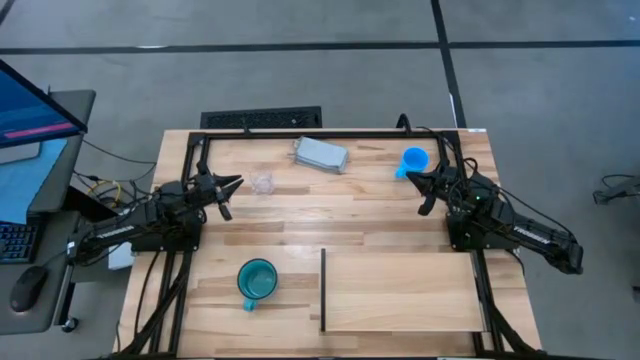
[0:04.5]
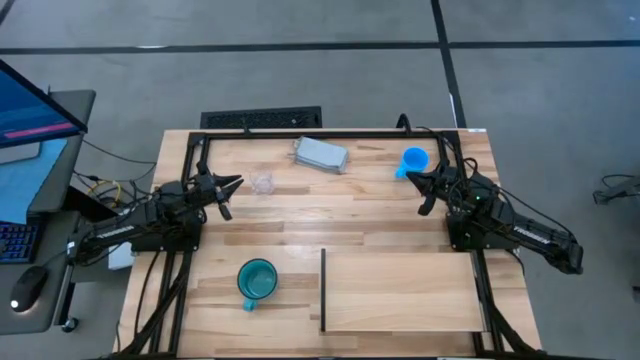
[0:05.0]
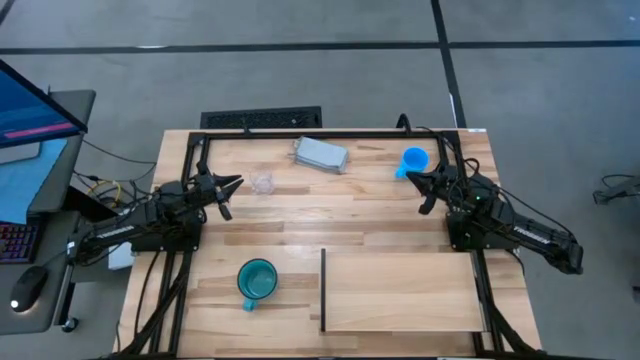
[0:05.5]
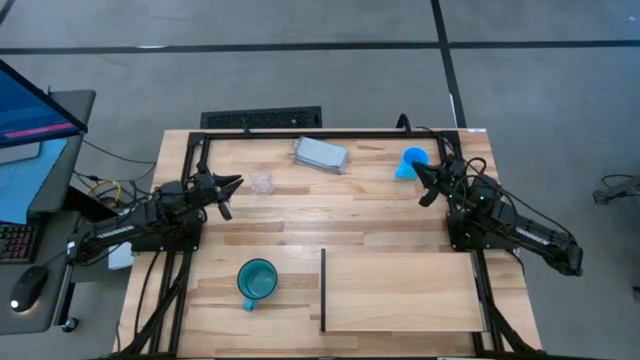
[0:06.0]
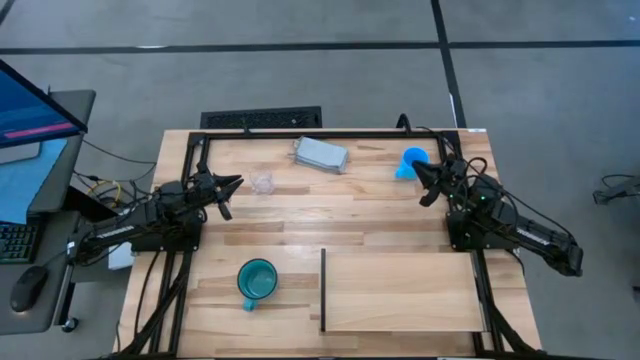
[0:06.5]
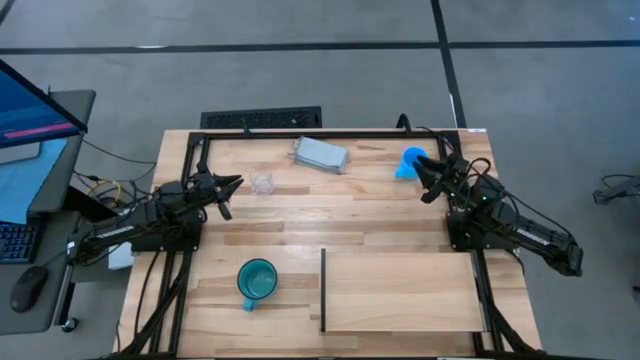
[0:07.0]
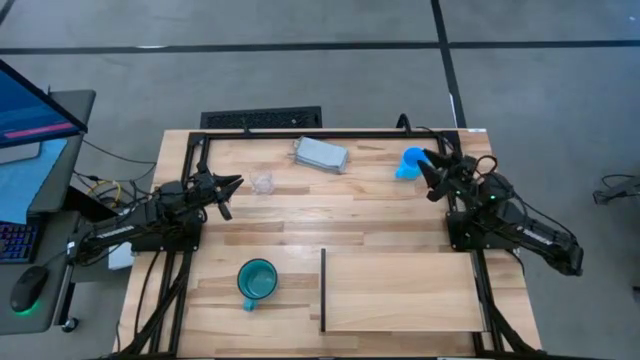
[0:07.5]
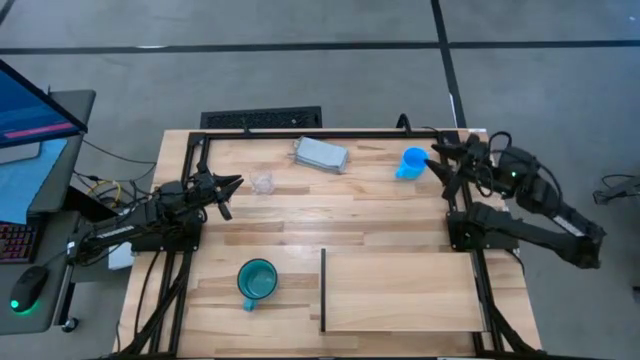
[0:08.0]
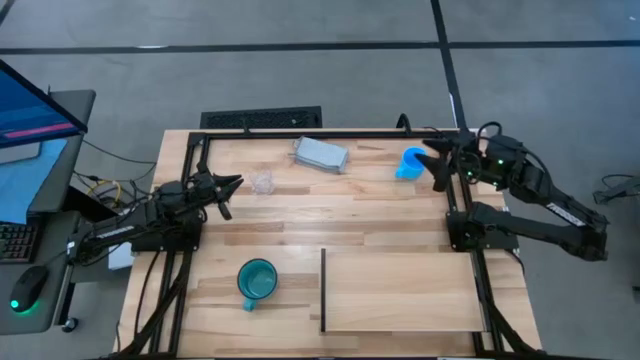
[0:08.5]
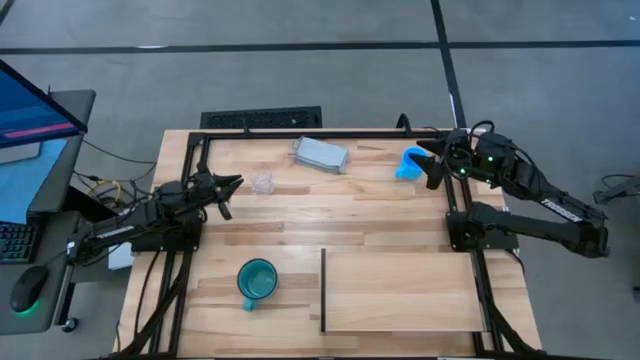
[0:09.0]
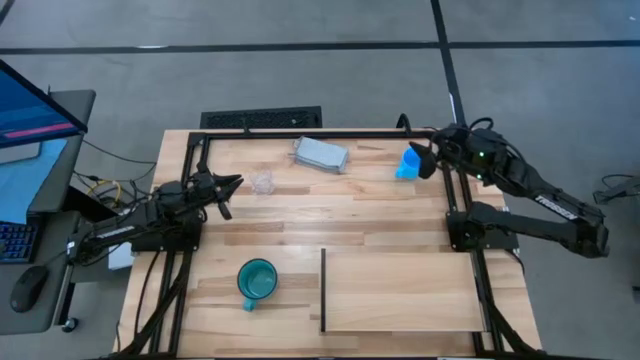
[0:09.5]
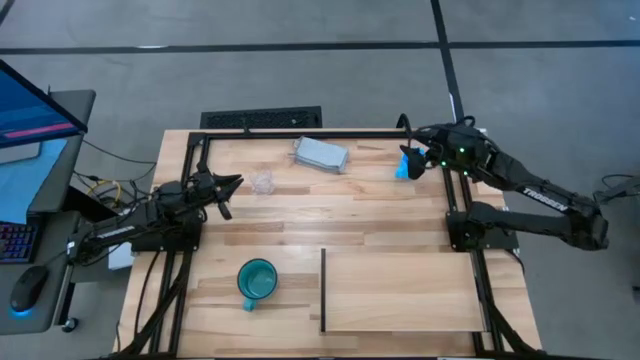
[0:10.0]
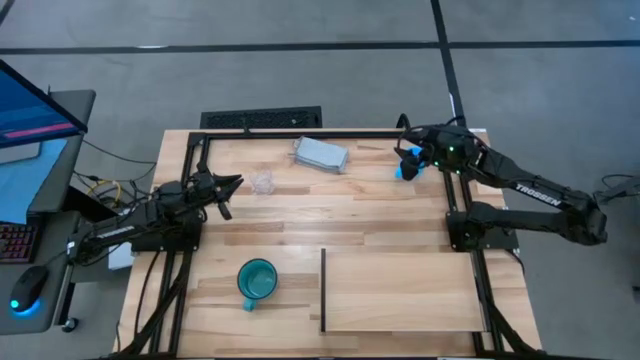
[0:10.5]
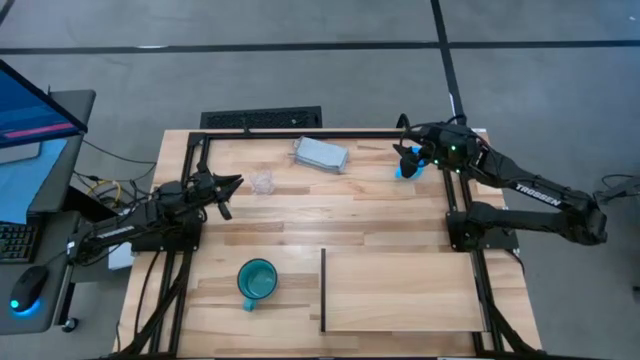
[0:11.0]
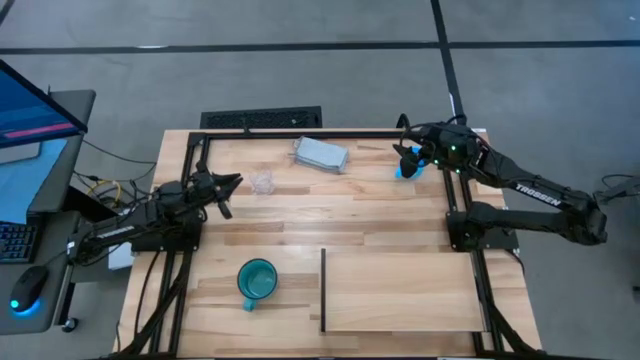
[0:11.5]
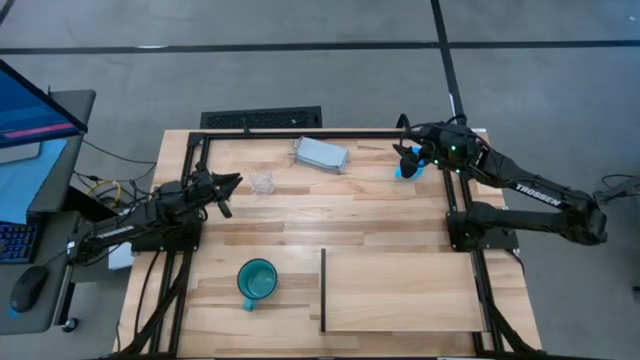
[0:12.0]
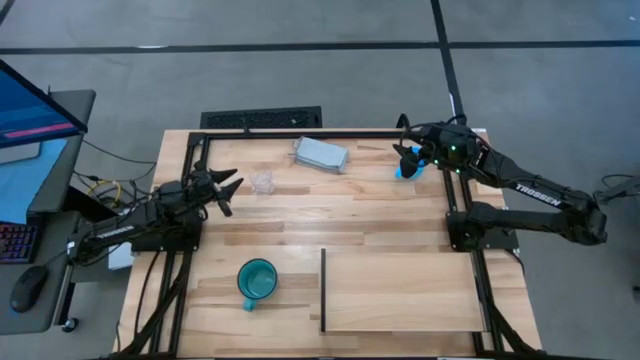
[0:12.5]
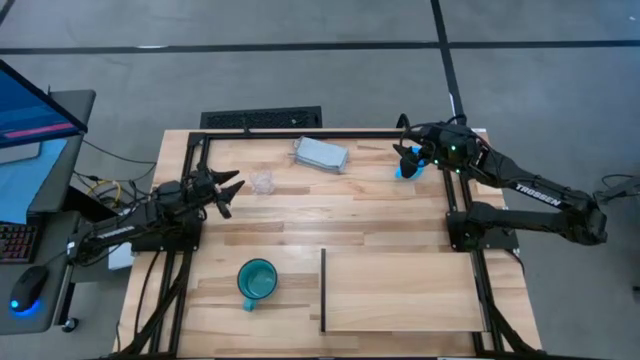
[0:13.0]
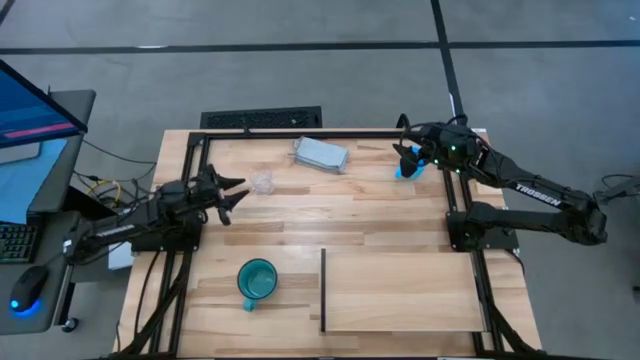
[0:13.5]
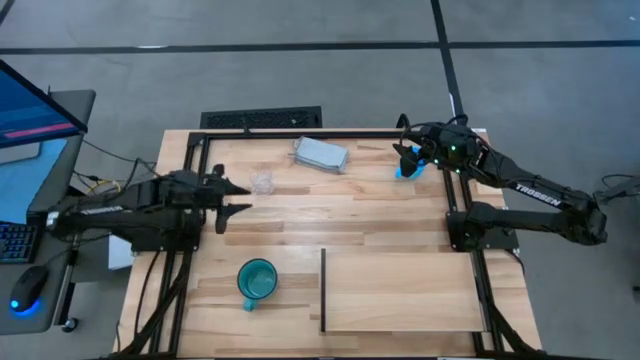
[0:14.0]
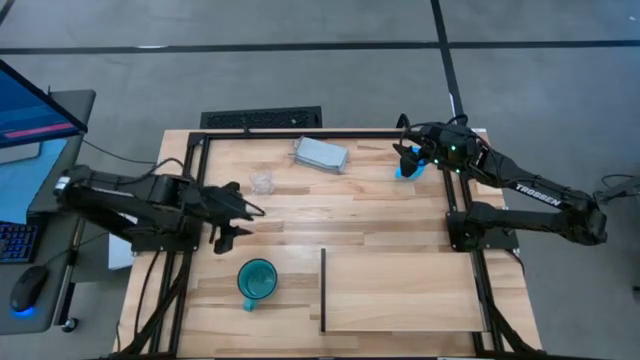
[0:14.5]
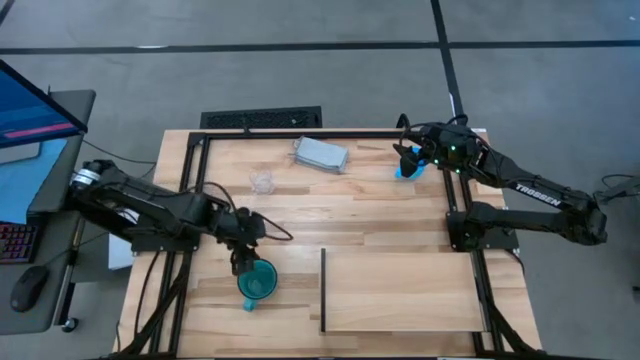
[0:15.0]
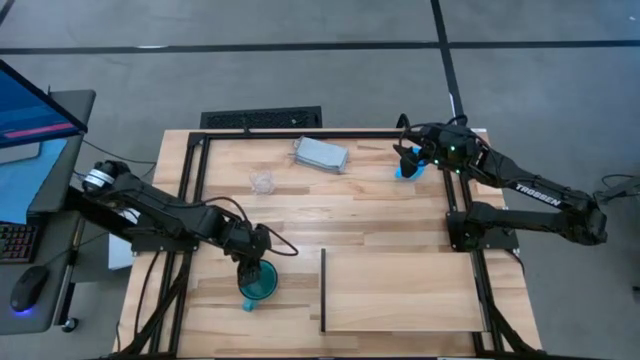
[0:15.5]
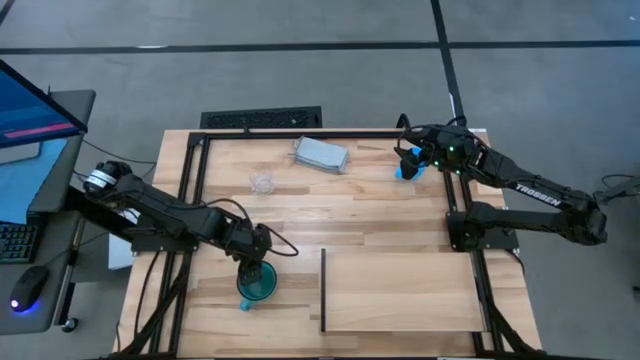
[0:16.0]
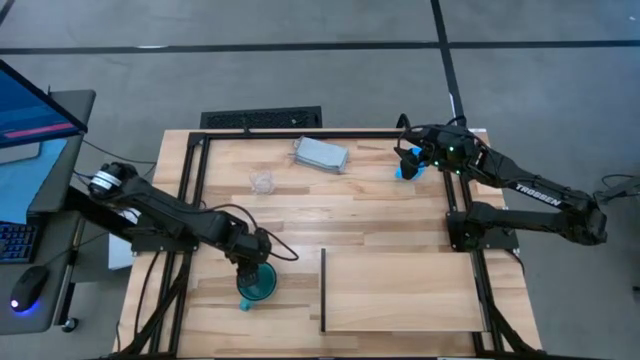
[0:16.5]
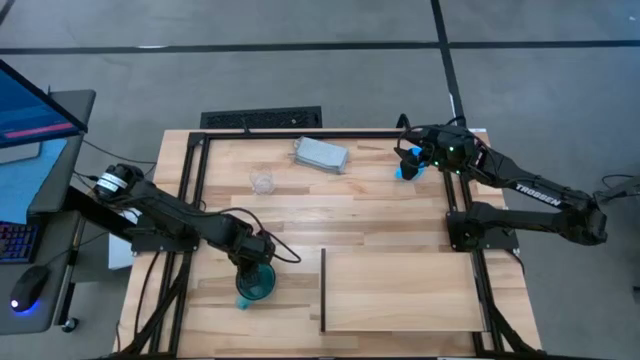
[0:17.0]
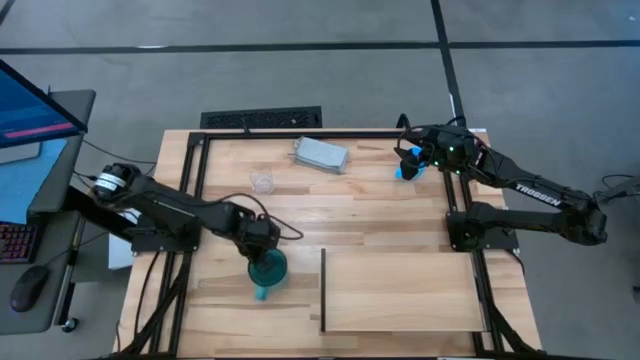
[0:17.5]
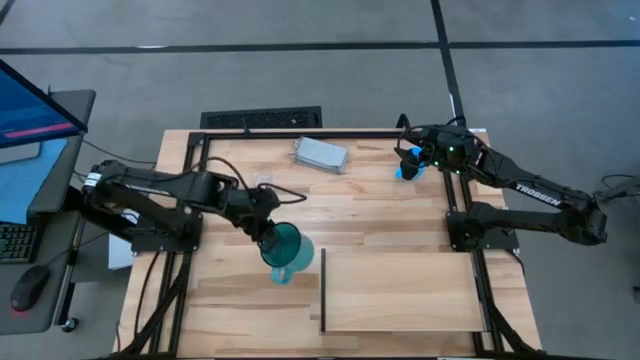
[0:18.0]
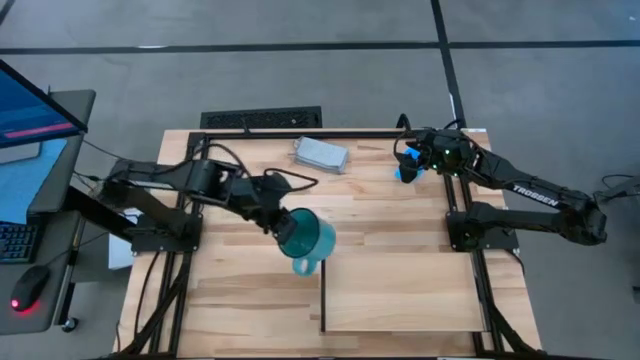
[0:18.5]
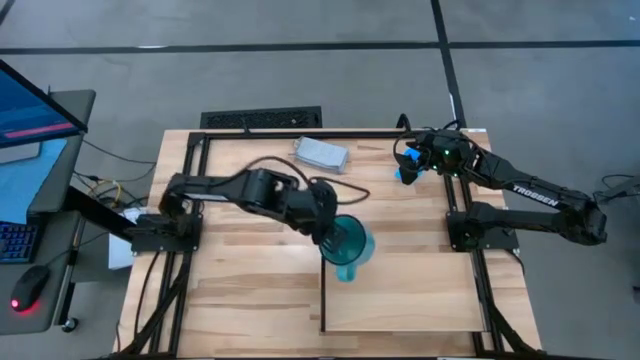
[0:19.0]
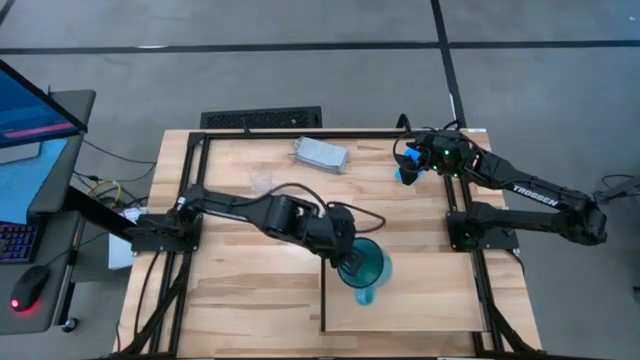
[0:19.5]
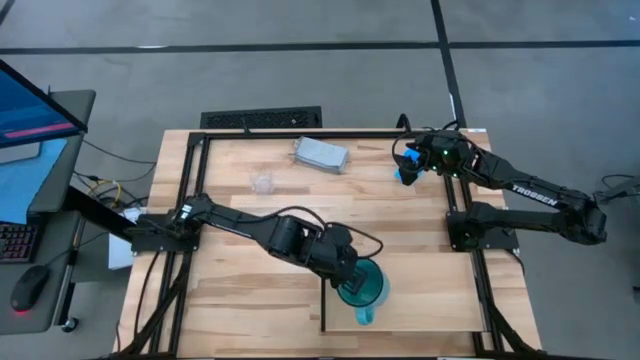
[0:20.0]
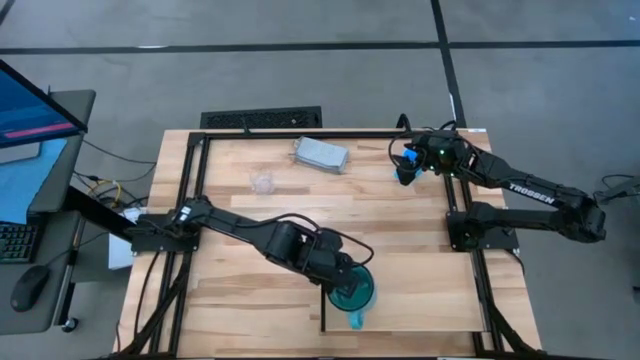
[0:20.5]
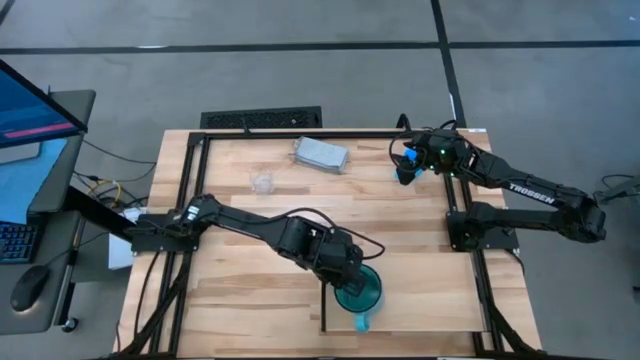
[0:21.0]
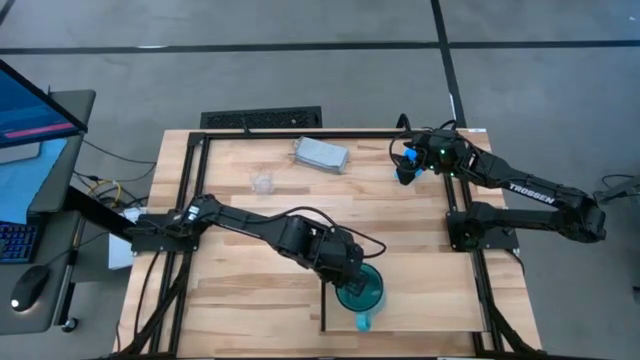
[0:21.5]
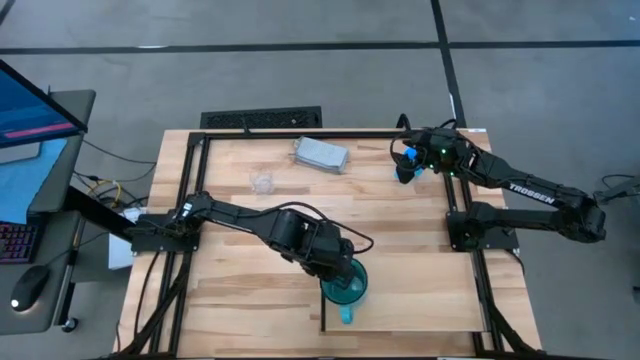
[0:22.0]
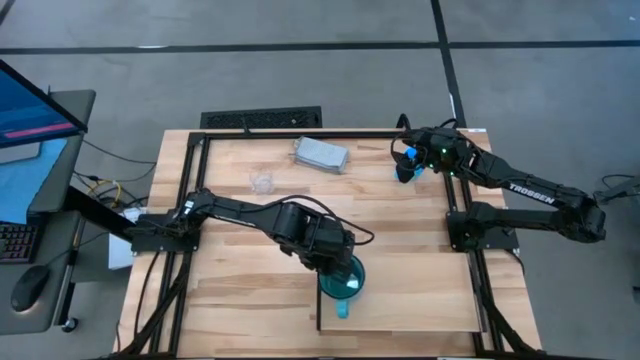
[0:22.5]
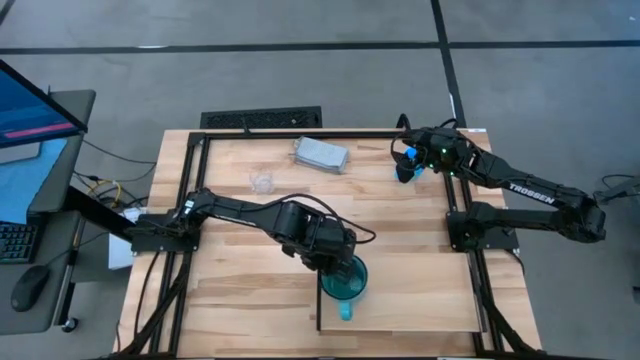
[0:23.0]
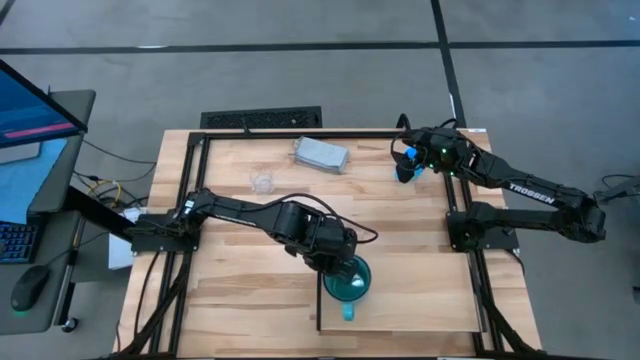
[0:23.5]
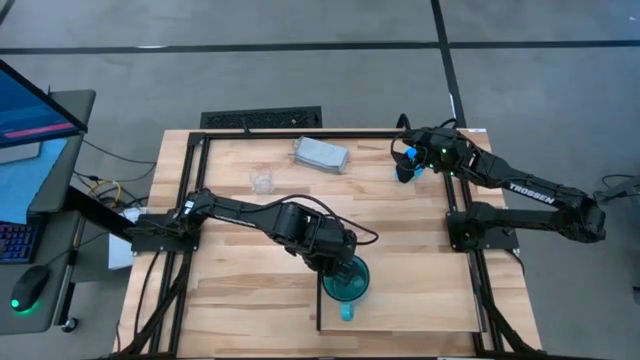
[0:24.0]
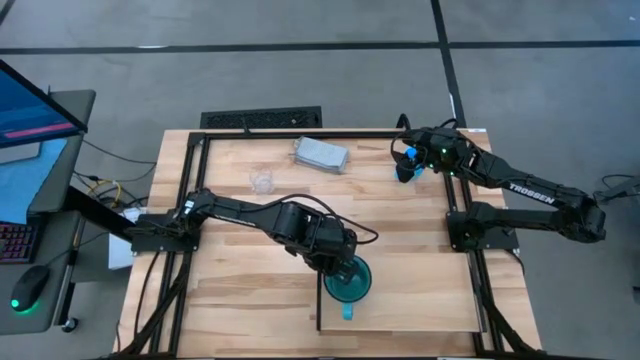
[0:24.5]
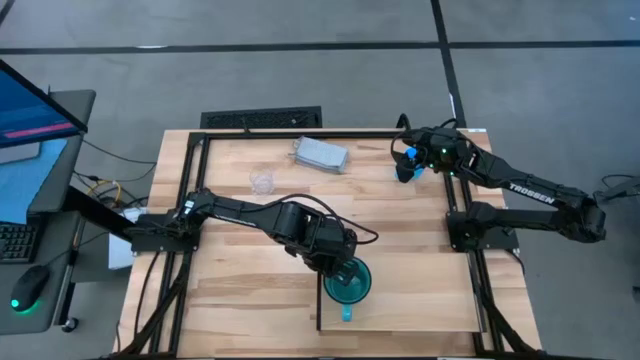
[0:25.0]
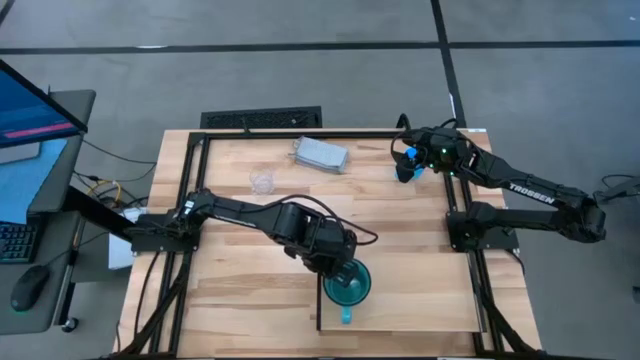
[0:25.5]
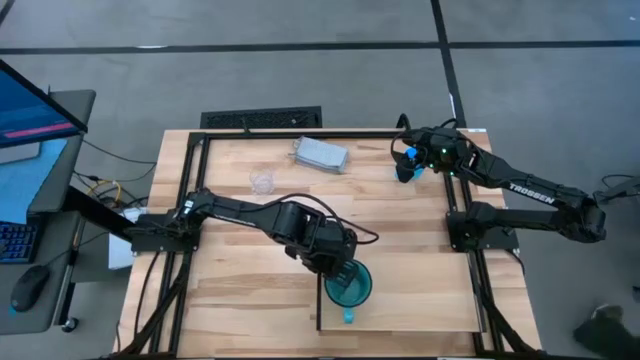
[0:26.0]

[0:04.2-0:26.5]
Task: Stack small to large cups/mugs on shelf
Put the blue mug on the shelf
